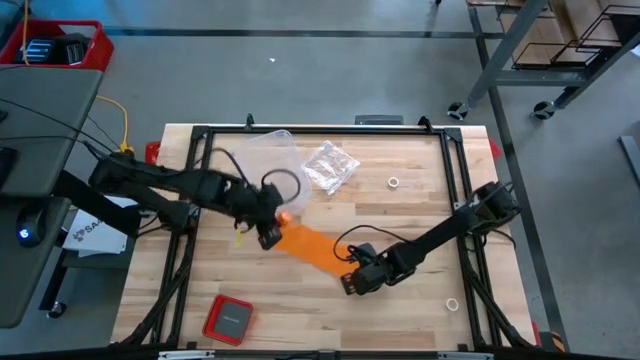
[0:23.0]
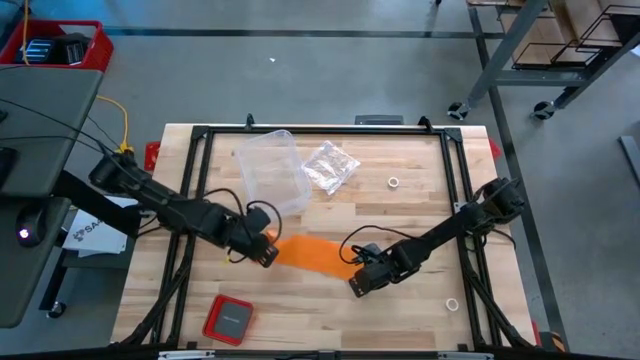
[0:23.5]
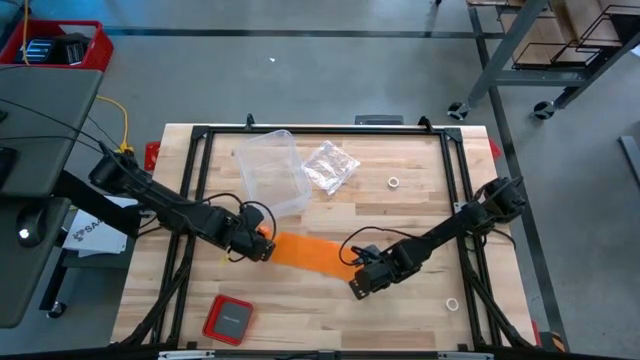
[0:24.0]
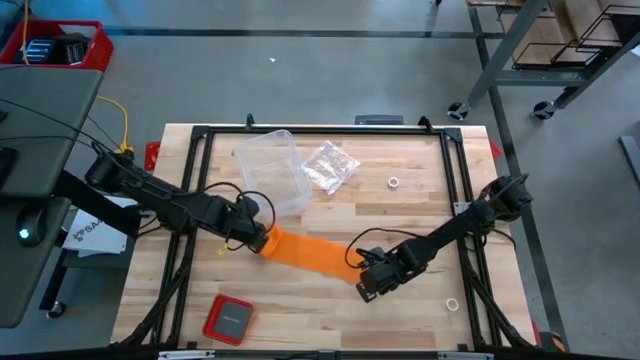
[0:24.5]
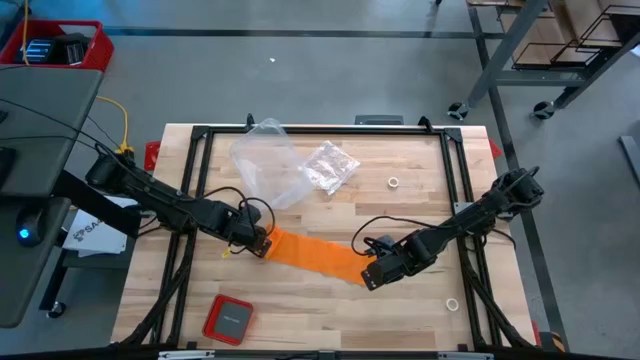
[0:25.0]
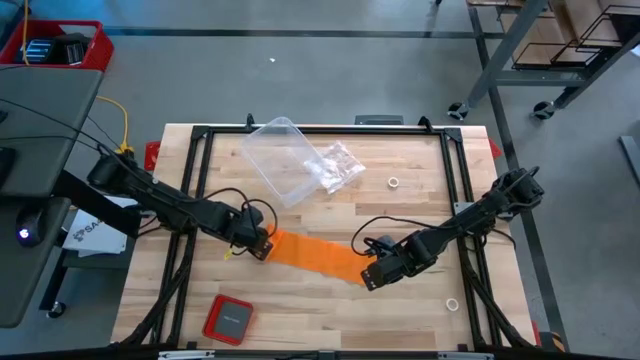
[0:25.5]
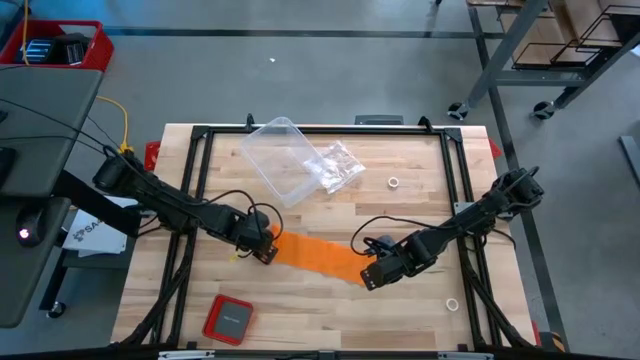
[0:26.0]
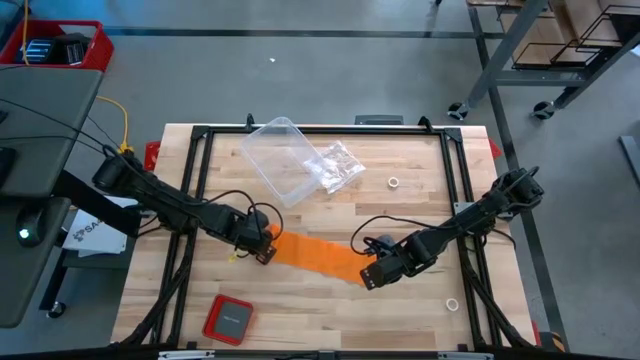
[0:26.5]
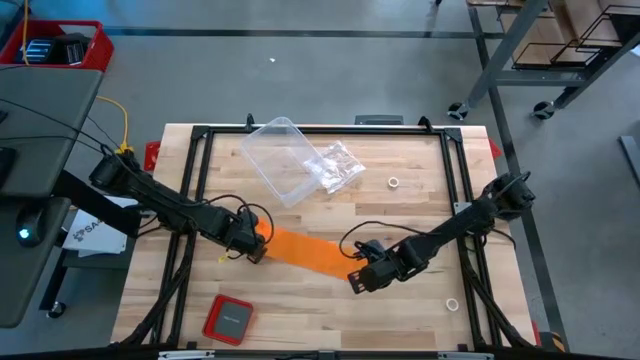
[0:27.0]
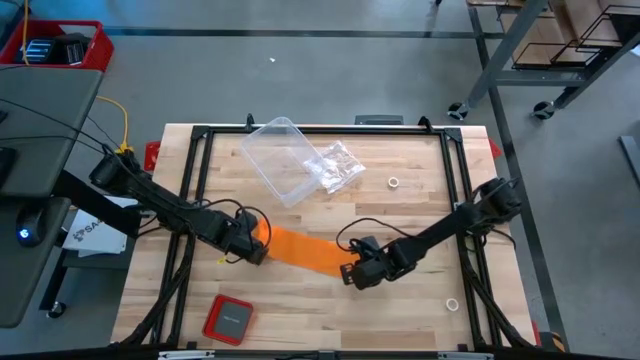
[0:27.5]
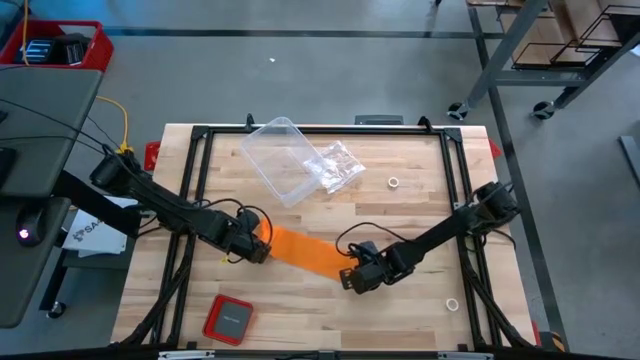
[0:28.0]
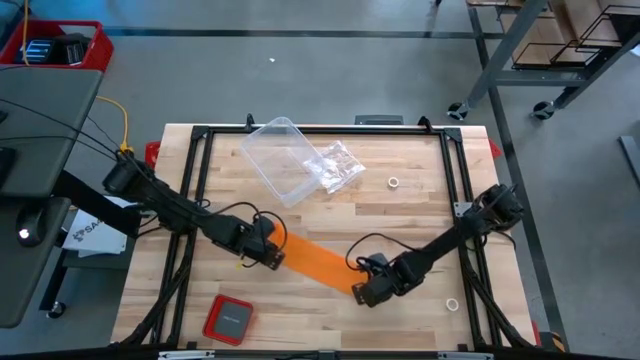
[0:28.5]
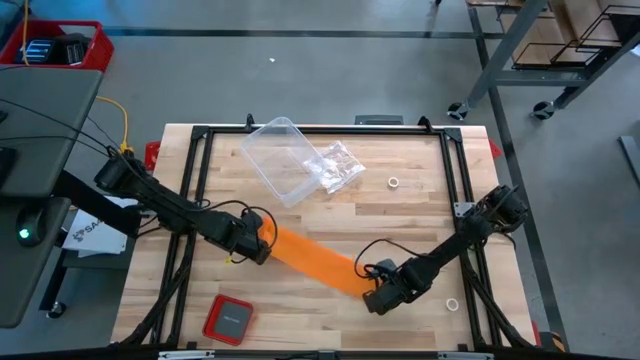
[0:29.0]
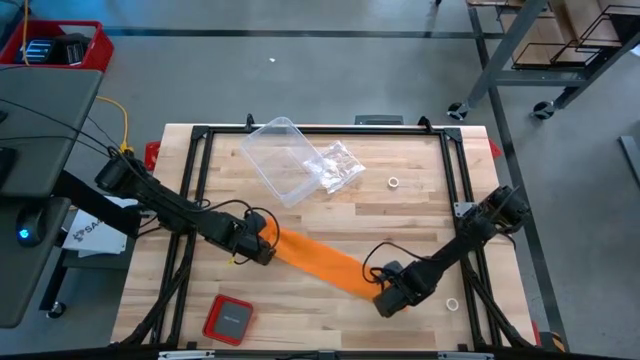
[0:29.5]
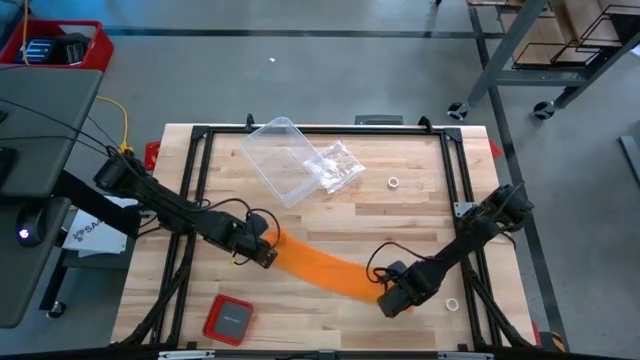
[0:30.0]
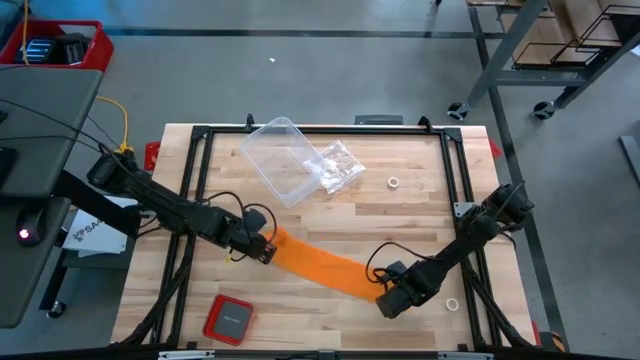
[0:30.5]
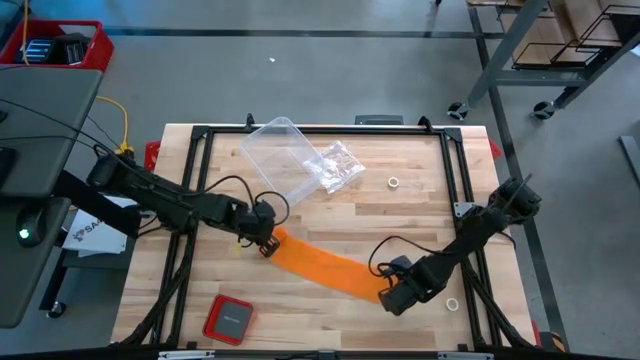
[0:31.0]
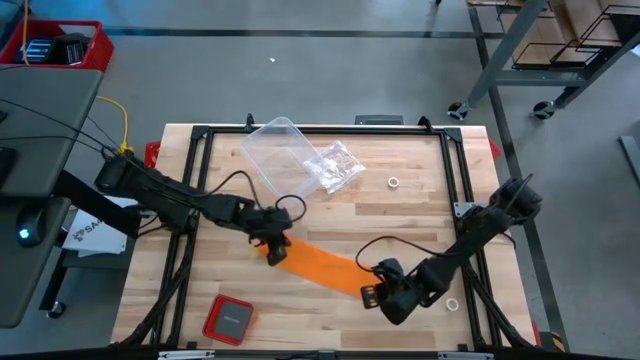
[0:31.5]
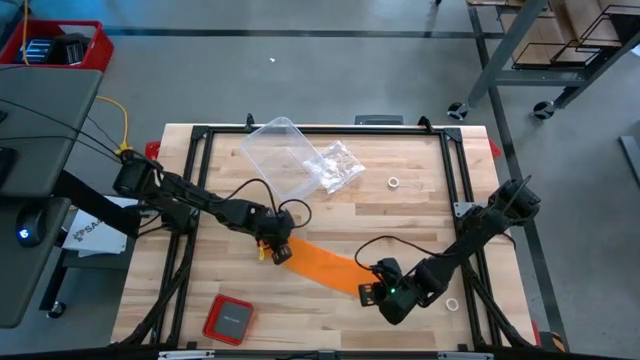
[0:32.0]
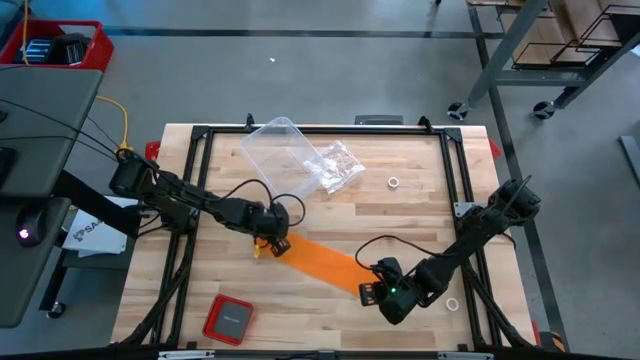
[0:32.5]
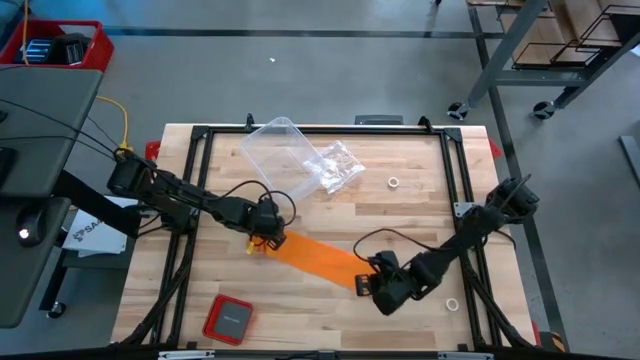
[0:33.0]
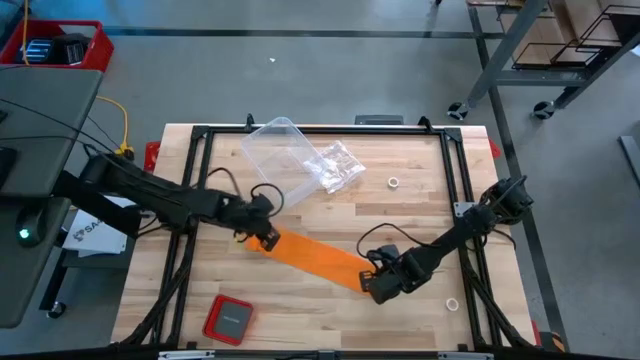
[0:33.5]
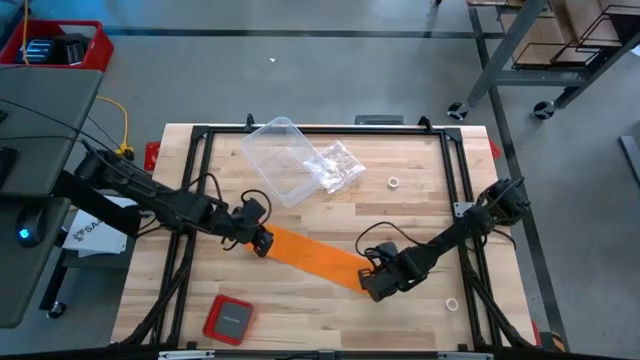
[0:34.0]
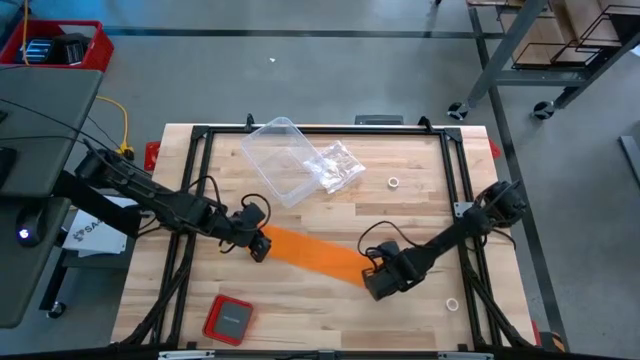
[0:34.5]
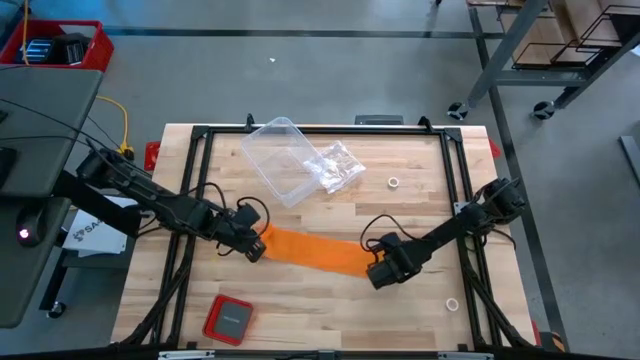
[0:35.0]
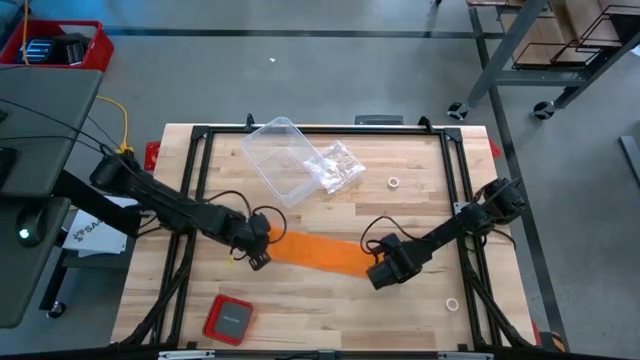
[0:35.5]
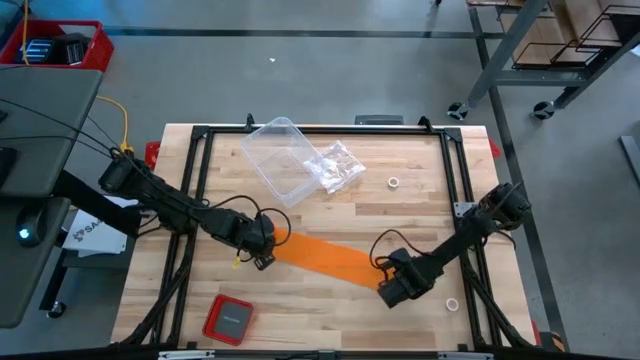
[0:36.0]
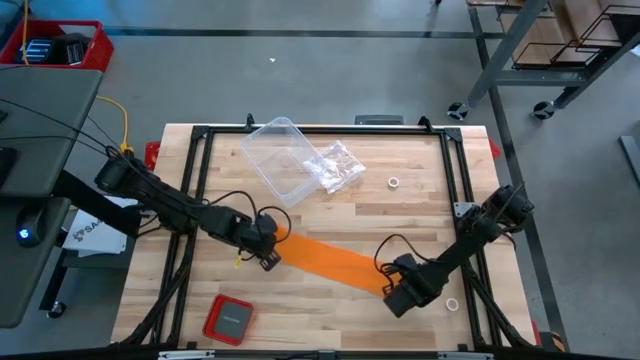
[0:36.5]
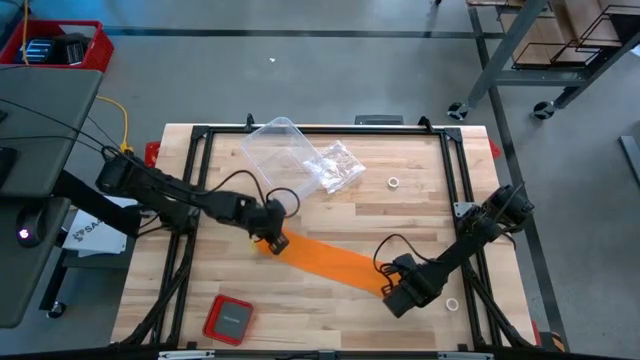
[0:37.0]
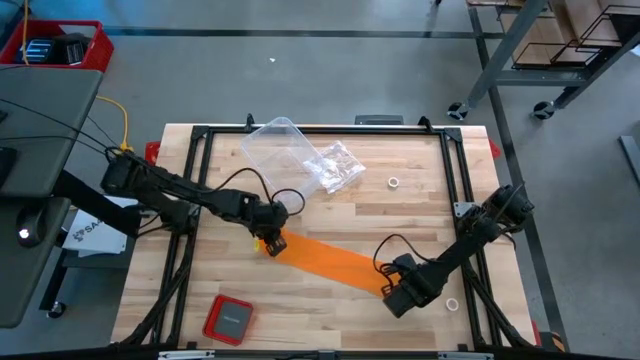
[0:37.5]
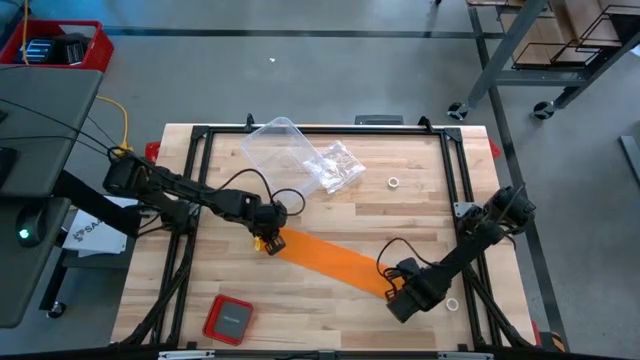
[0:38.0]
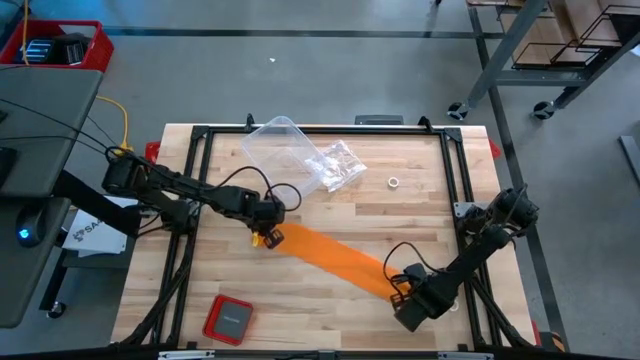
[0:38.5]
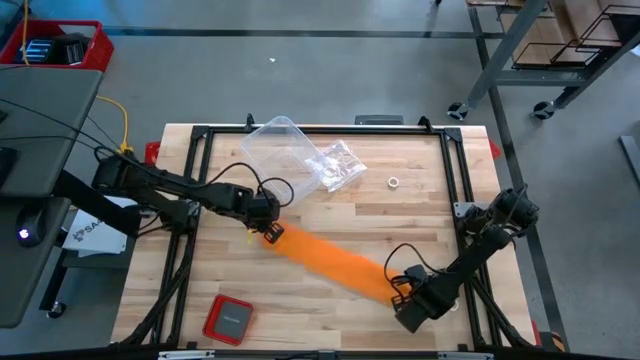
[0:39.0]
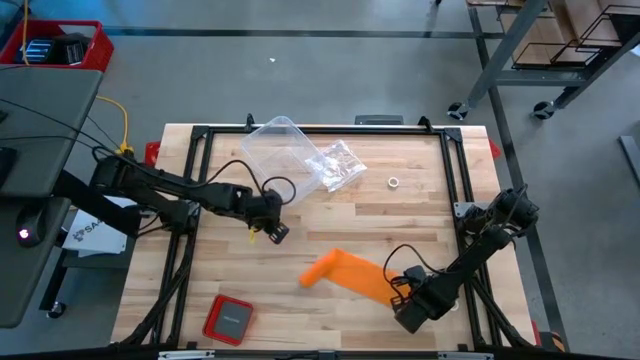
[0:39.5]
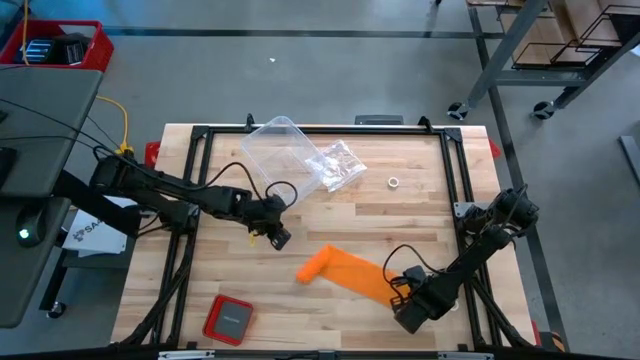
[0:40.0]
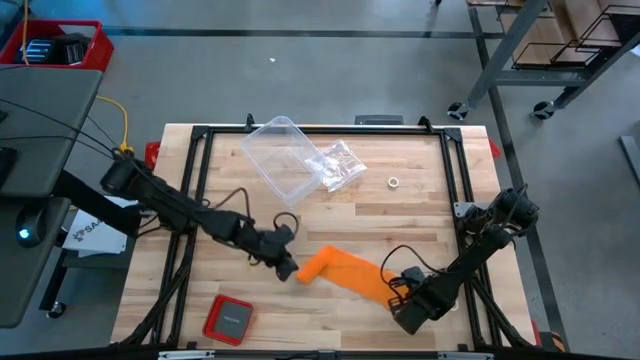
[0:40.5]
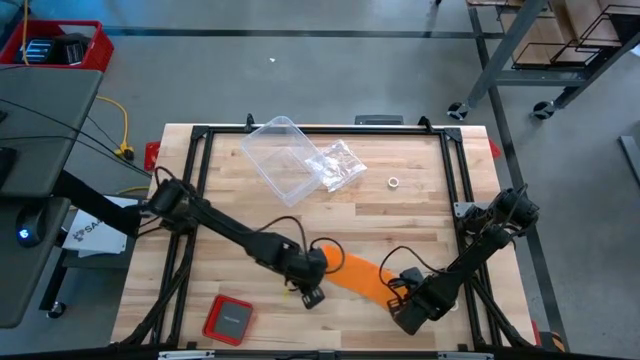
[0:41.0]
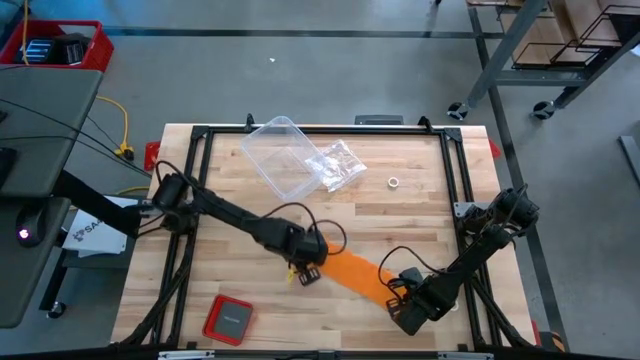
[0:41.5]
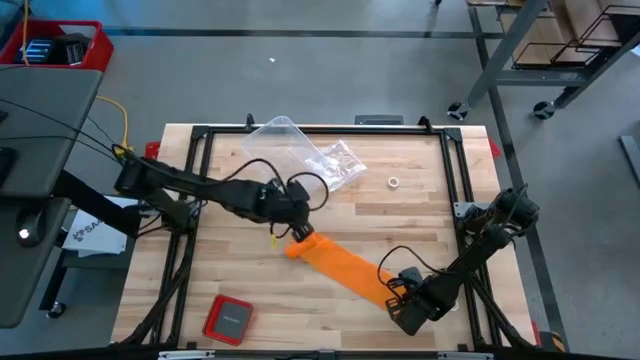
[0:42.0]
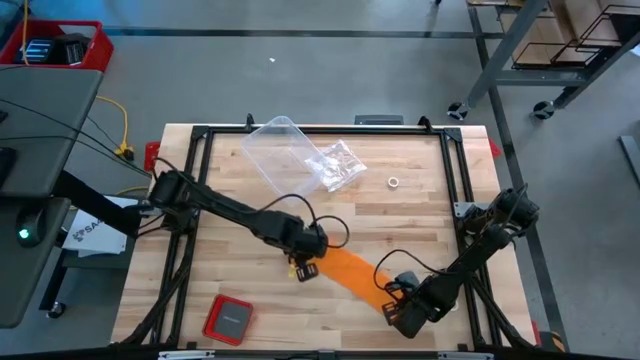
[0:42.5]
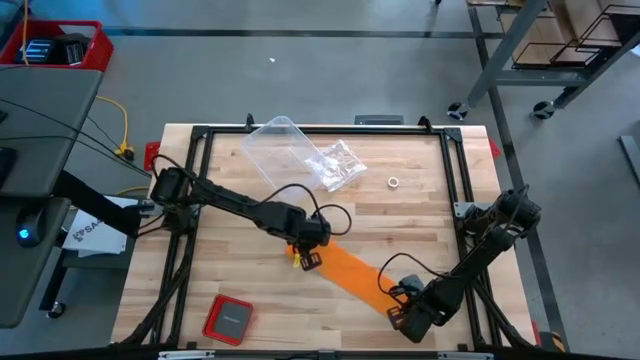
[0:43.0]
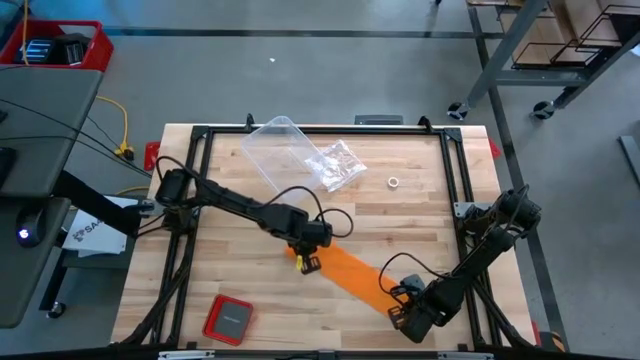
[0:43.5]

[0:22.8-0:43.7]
Task: Roll bandage
Roll the orange bandage
